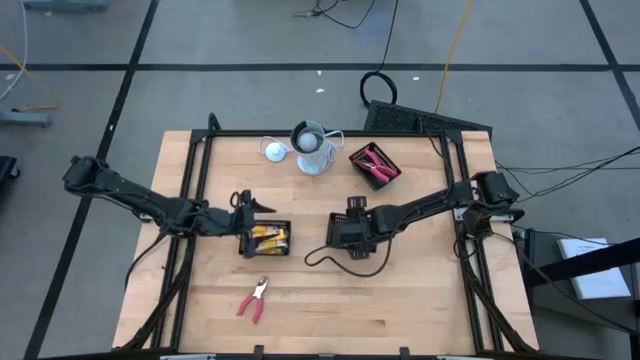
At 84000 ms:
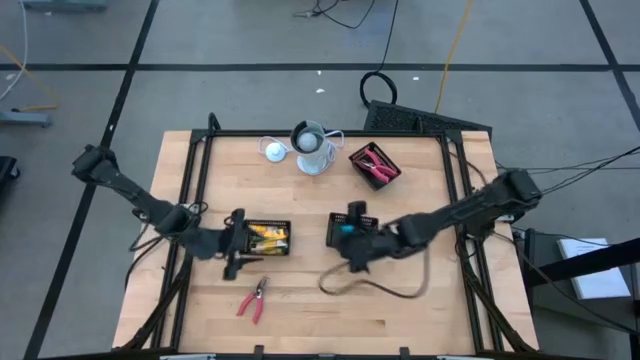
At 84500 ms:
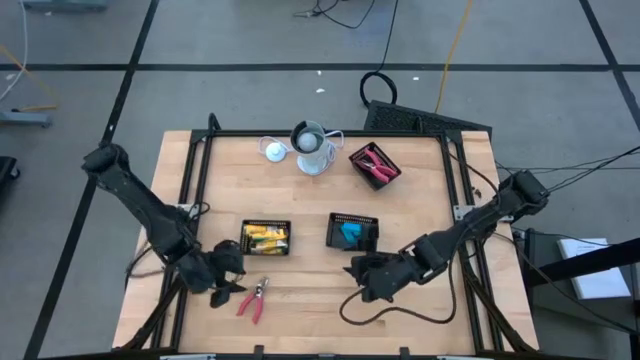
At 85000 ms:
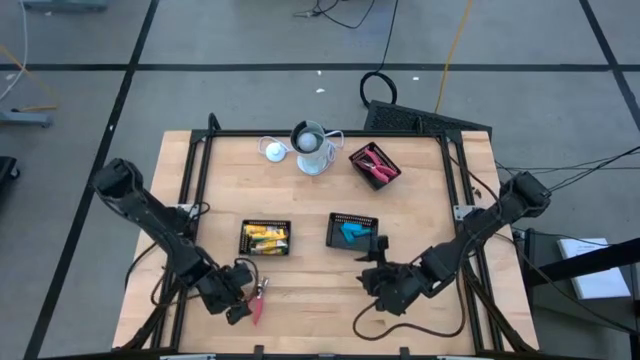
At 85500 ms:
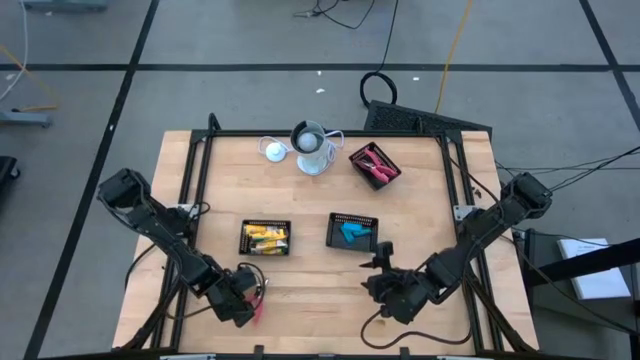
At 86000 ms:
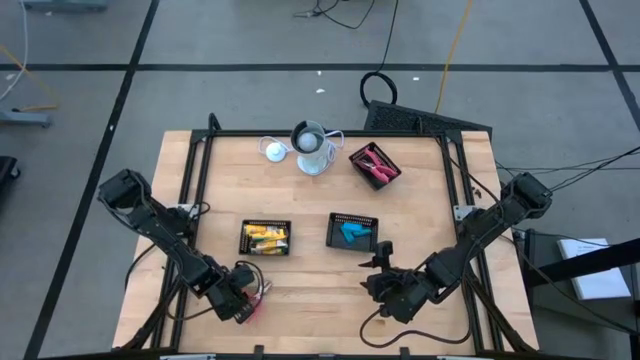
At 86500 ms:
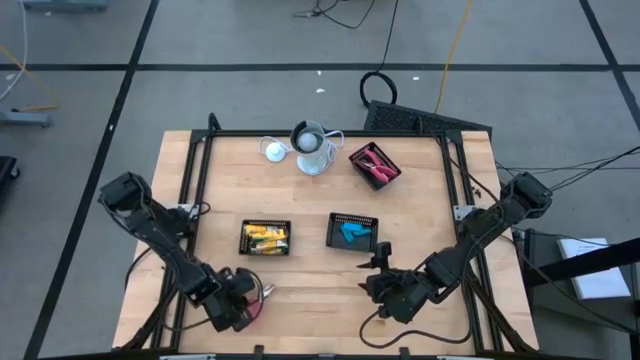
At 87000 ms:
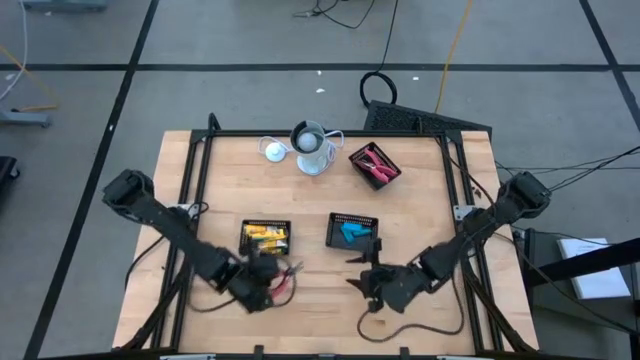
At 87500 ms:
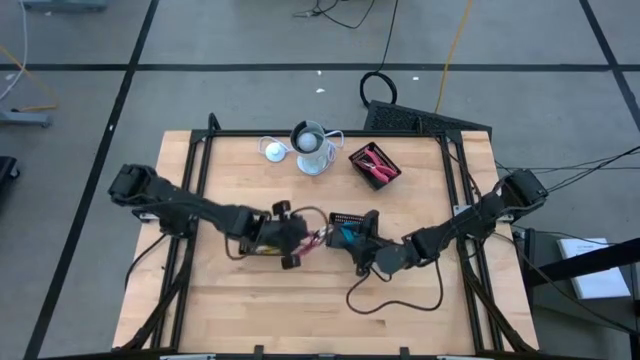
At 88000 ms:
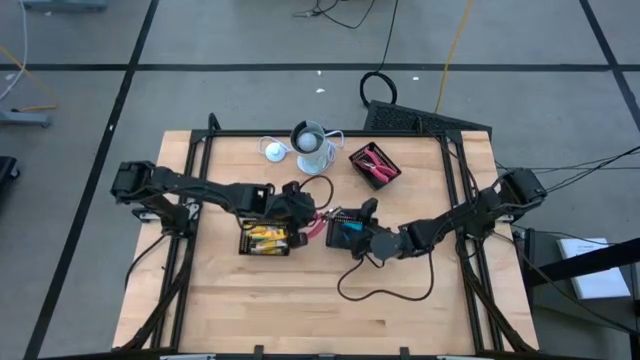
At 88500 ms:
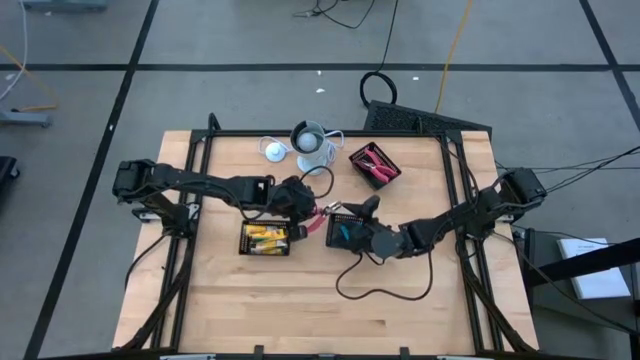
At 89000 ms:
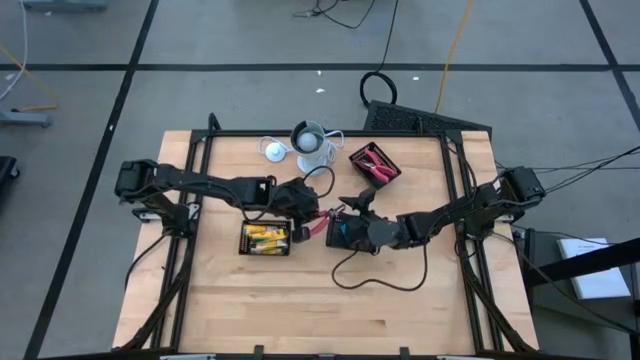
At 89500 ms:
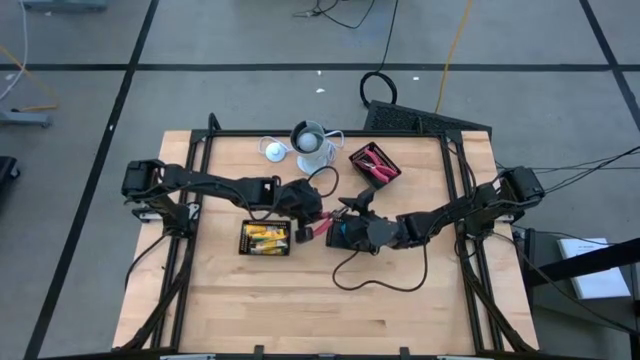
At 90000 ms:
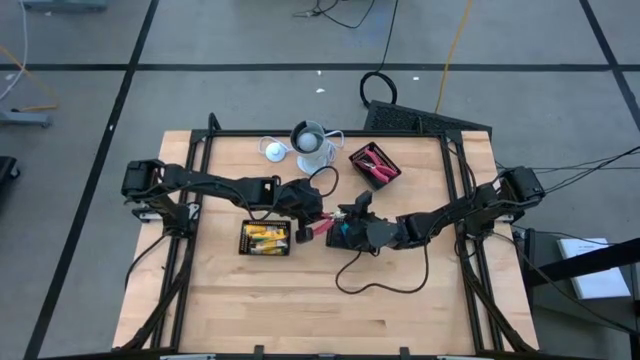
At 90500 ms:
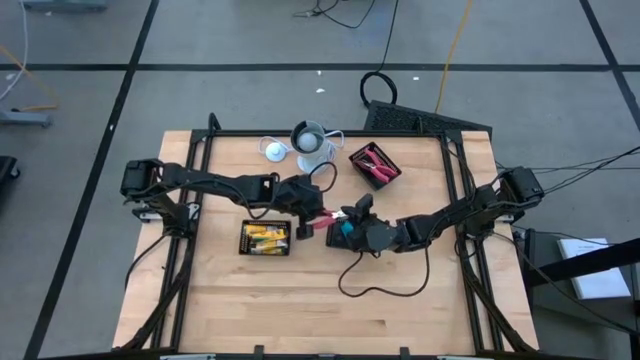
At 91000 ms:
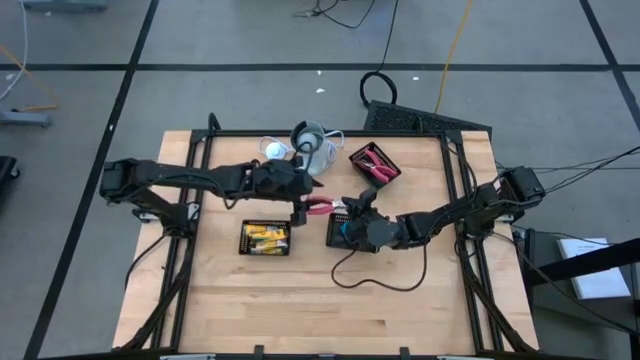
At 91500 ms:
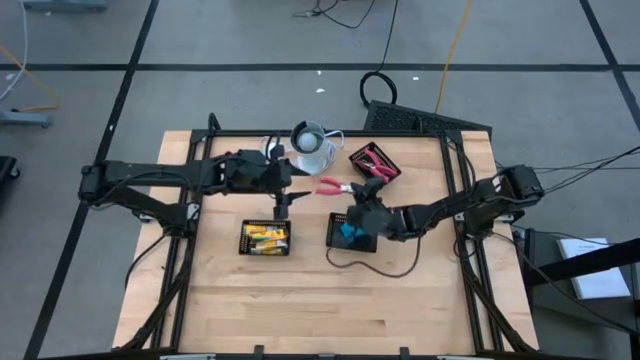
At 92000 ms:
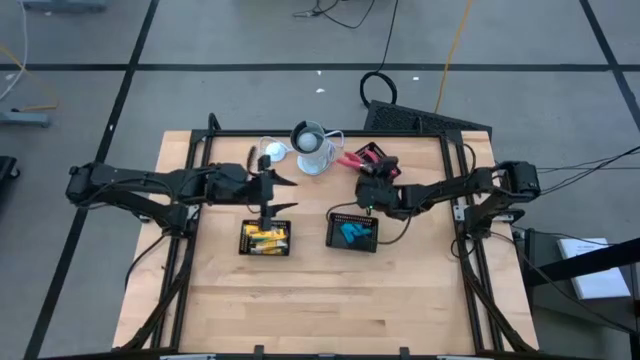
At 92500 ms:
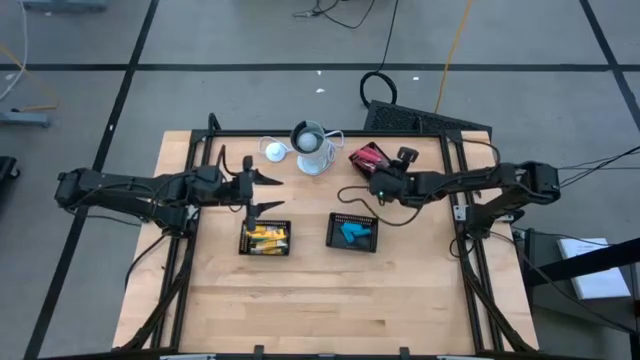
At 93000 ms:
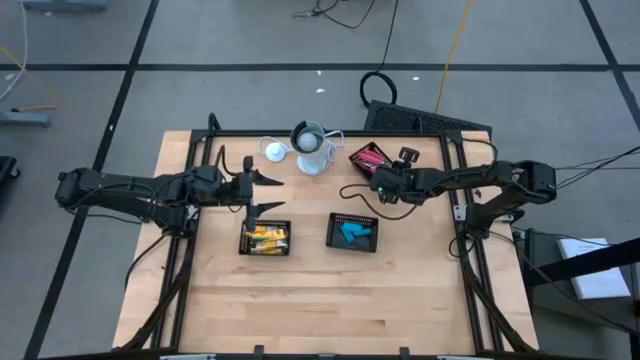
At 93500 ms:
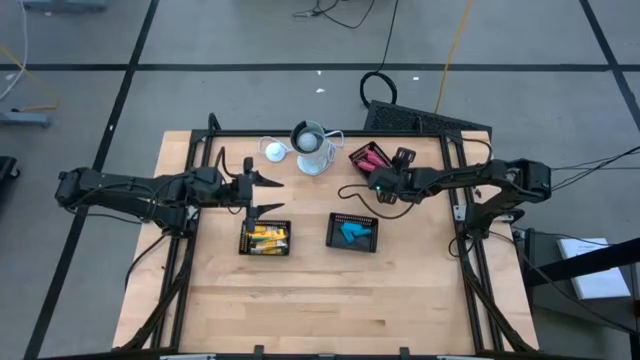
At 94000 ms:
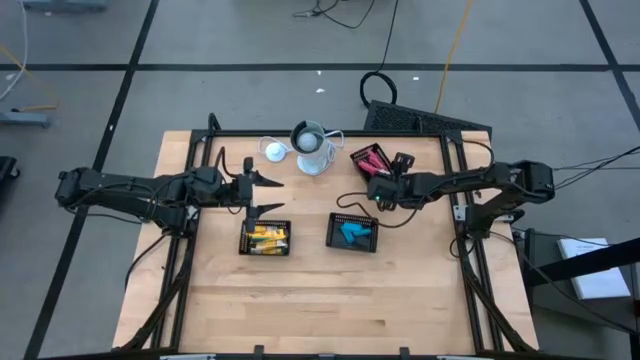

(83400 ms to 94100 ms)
Task: Pick & Place School Supplies
Put the pink hole puncher into the top black bin

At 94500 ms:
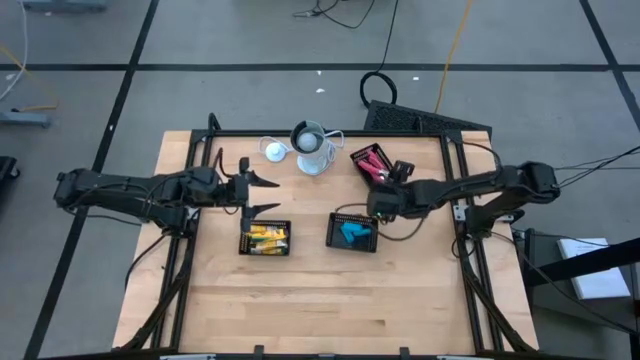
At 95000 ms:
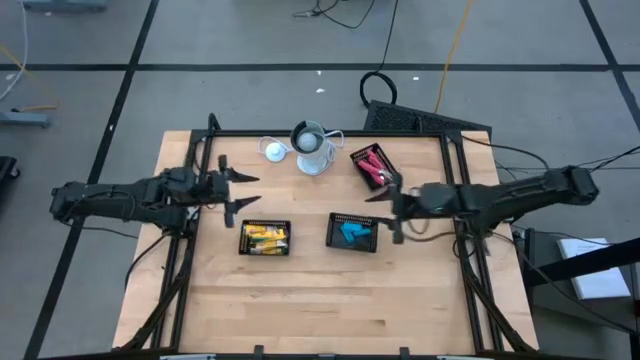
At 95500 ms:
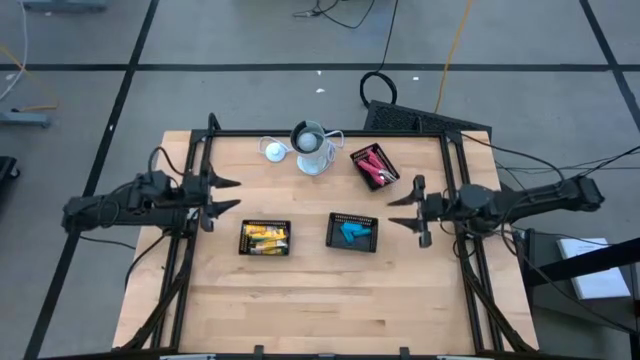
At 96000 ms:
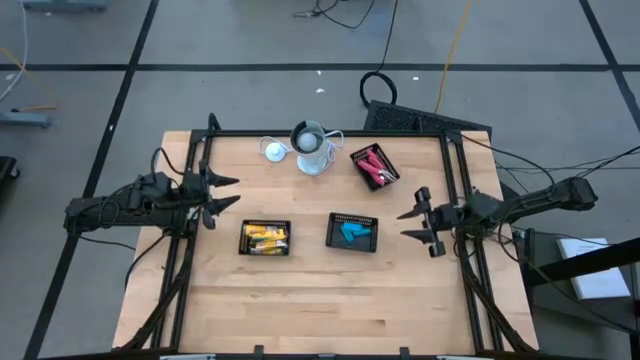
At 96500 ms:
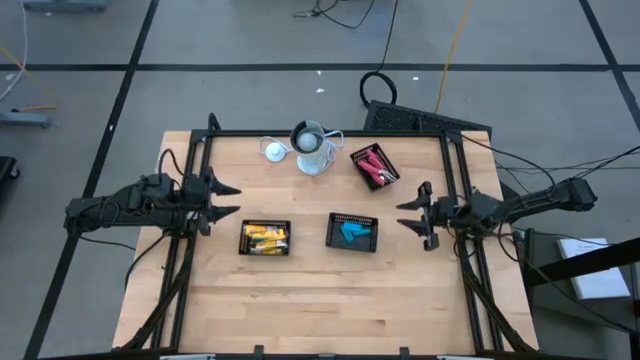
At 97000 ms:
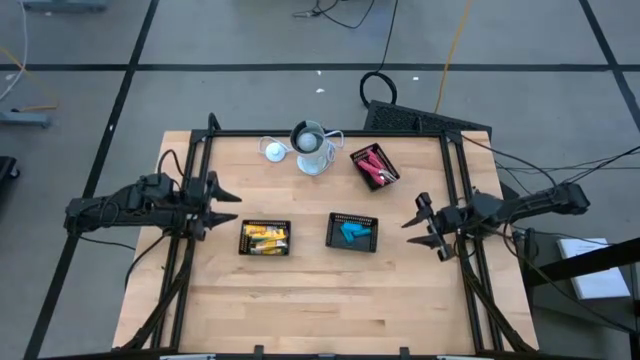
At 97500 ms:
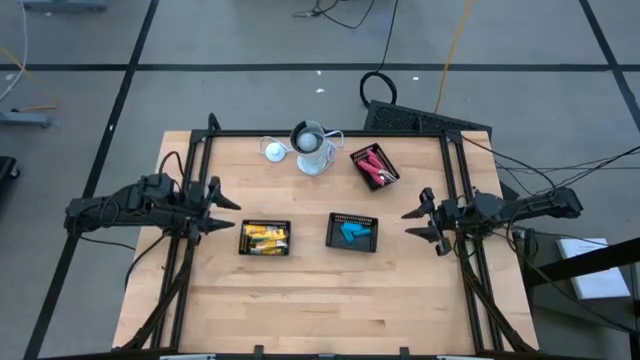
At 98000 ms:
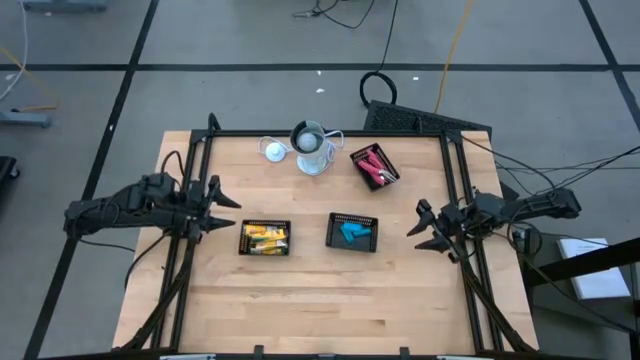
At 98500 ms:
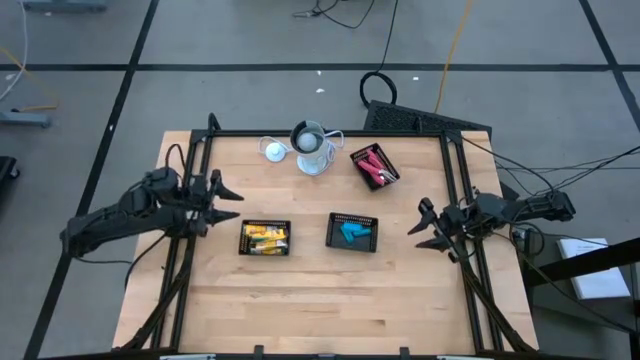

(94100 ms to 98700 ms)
Return to Home Position

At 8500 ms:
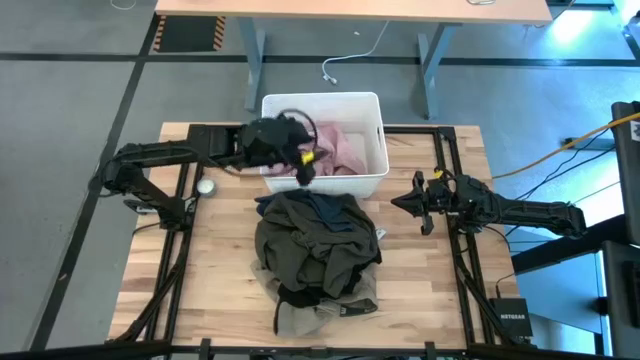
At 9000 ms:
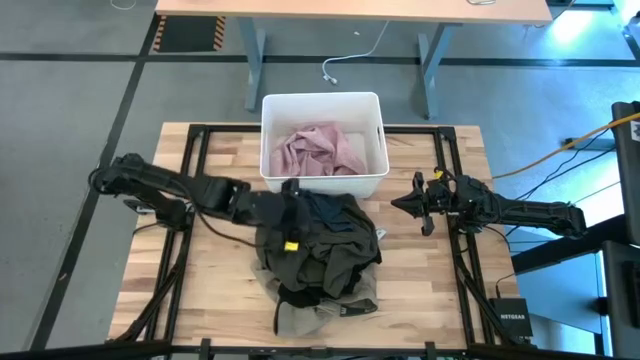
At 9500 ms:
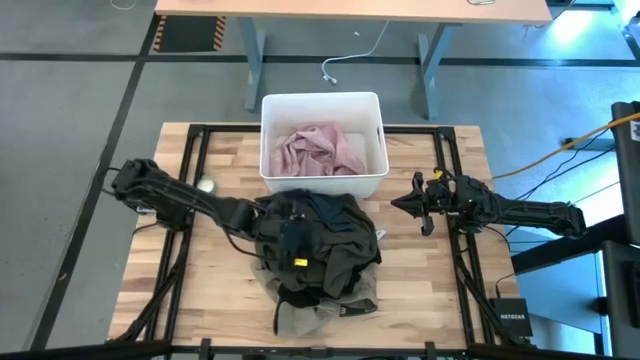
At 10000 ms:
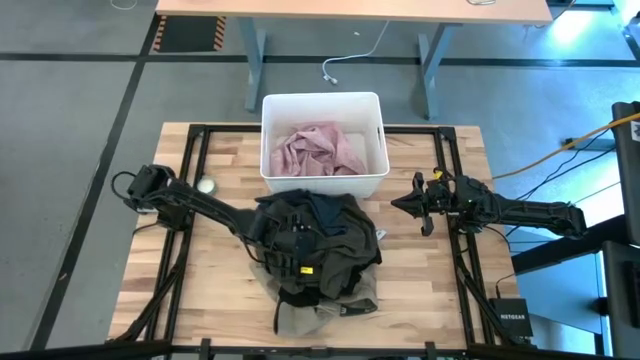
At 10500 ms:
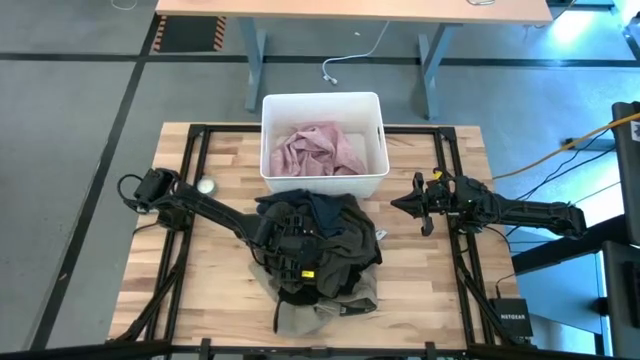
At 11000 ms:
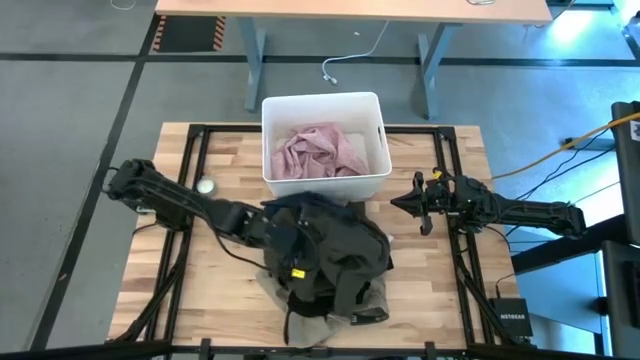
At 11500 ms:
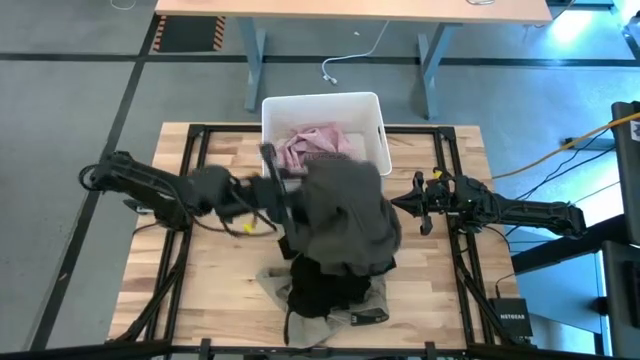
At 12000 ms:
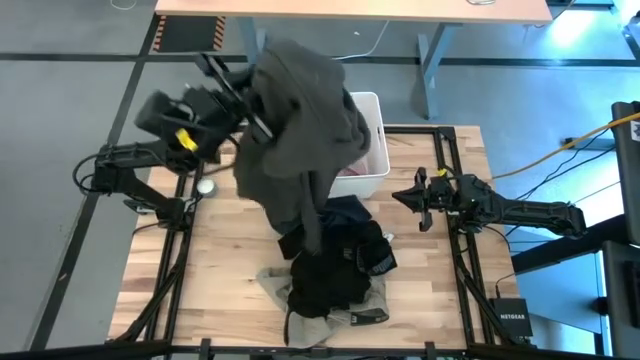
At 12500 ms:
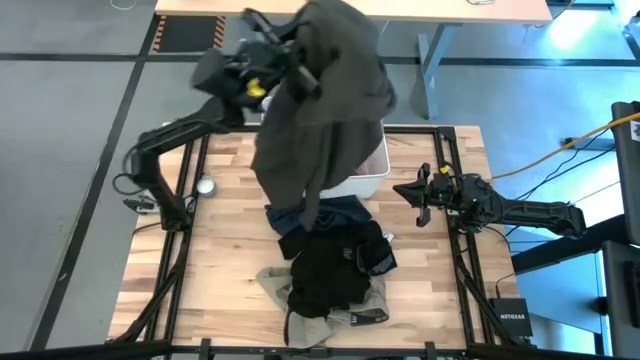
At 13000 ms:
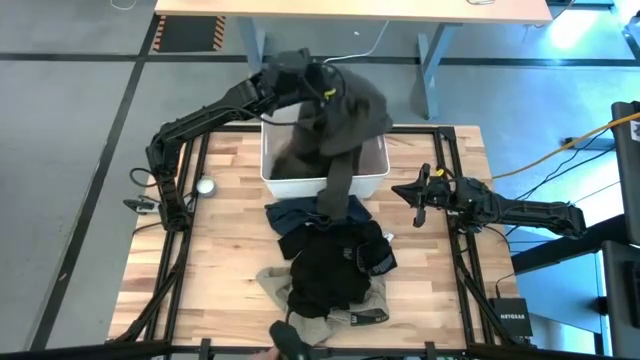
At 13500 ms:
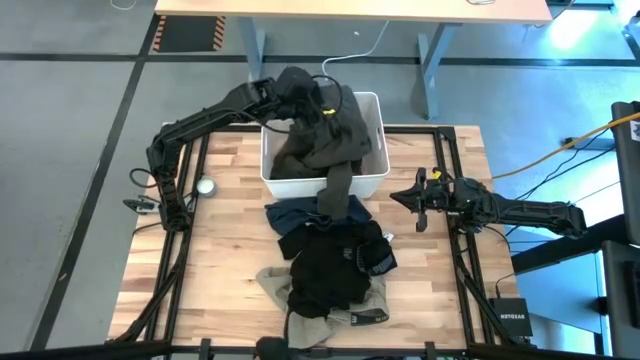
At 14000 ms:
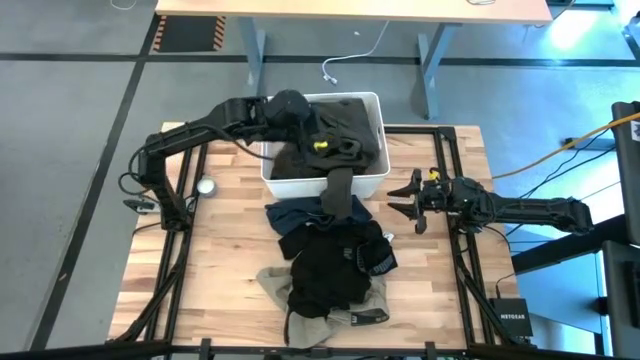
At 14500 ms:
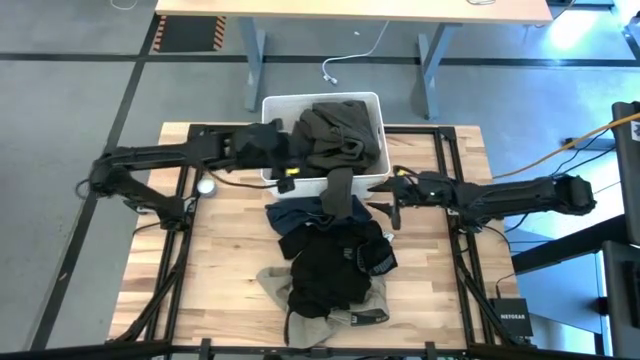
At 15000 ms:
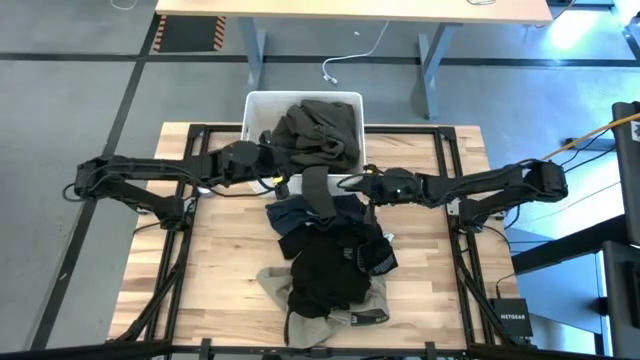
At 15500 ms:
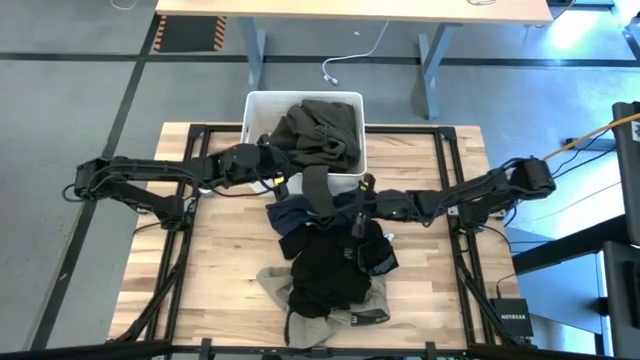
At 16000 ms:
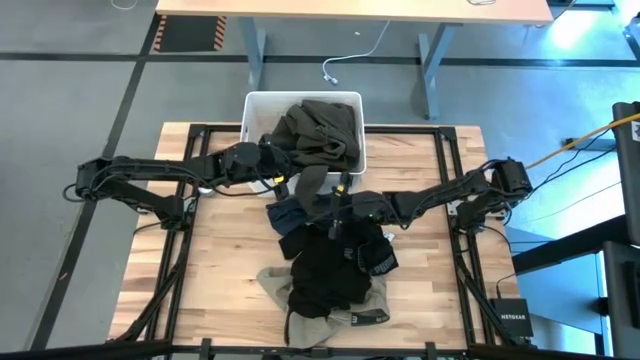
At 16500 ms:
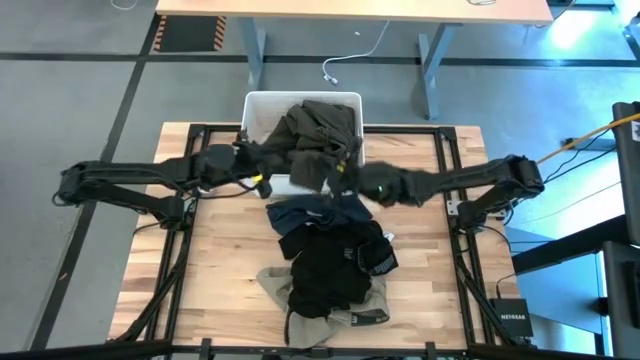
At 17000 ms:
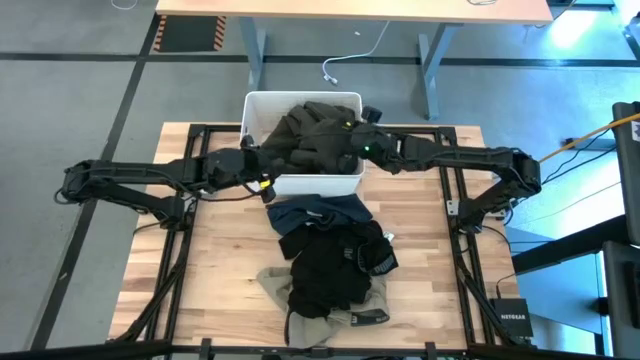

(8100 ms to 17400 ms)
Task: Sort clothes
Put the gray jacket into the white bin
